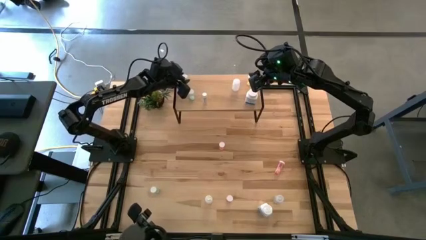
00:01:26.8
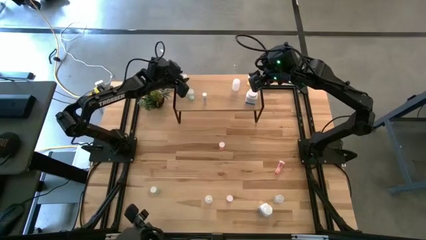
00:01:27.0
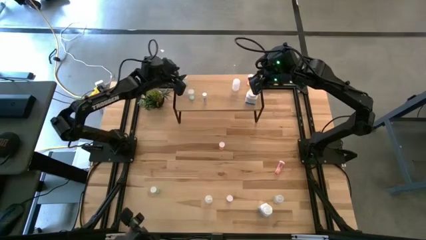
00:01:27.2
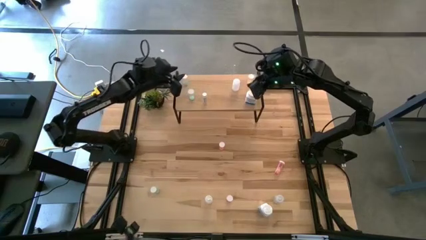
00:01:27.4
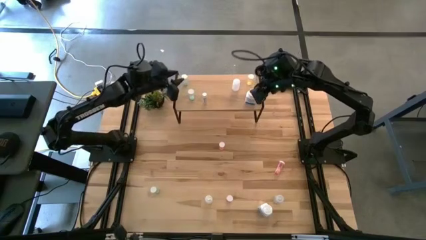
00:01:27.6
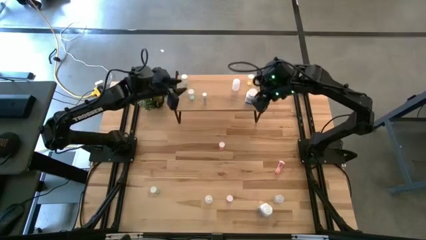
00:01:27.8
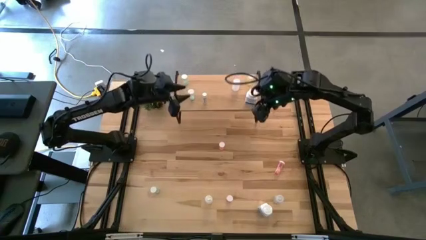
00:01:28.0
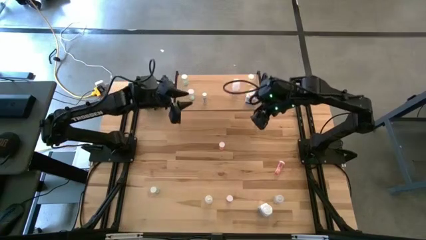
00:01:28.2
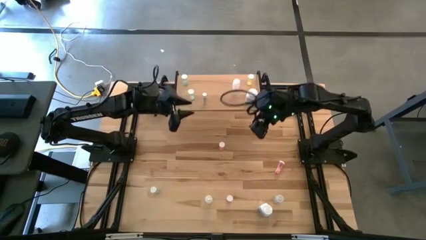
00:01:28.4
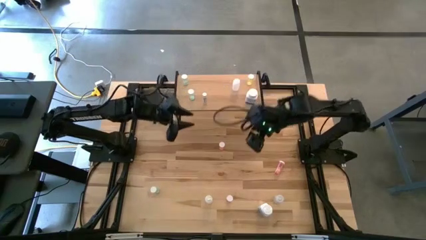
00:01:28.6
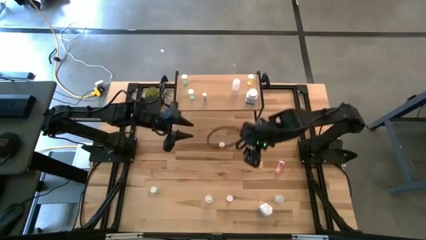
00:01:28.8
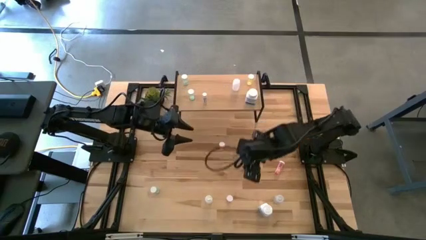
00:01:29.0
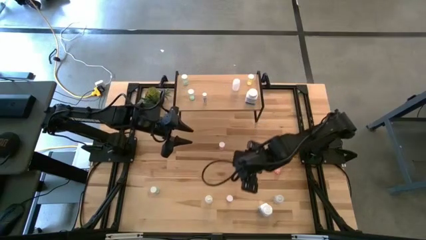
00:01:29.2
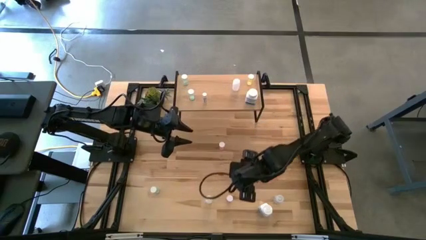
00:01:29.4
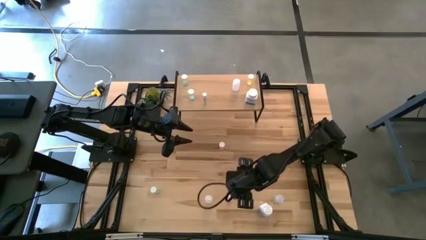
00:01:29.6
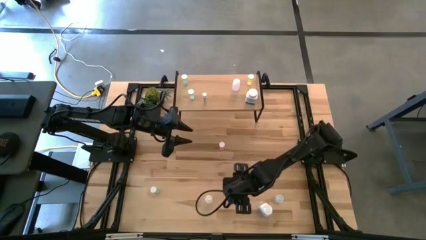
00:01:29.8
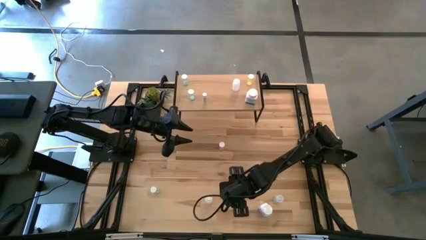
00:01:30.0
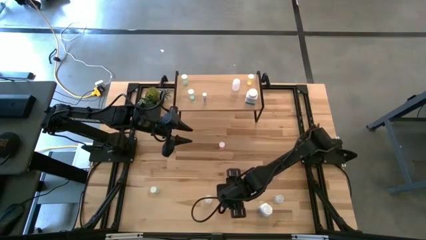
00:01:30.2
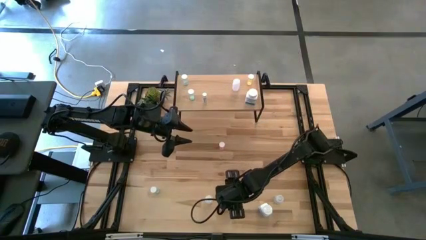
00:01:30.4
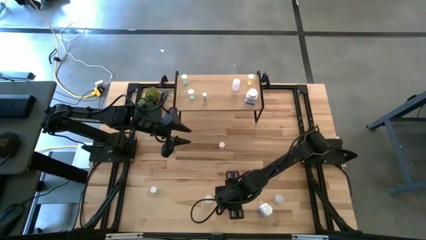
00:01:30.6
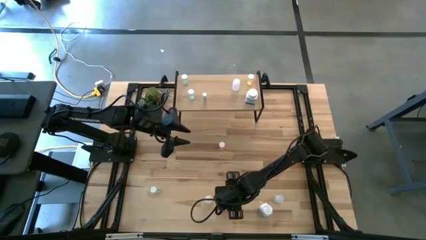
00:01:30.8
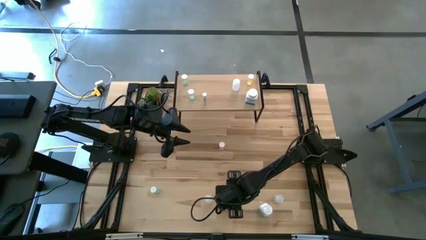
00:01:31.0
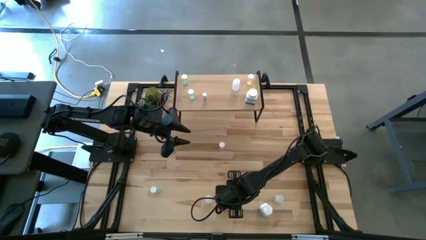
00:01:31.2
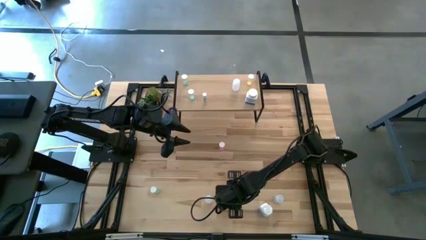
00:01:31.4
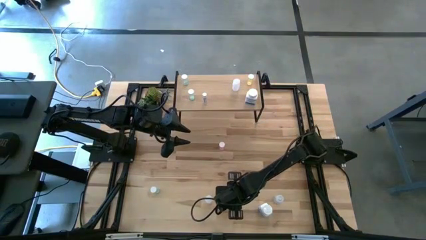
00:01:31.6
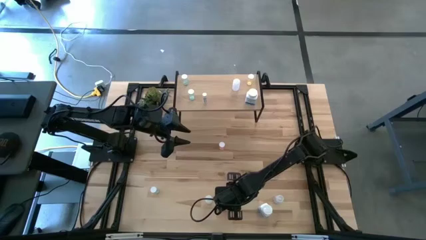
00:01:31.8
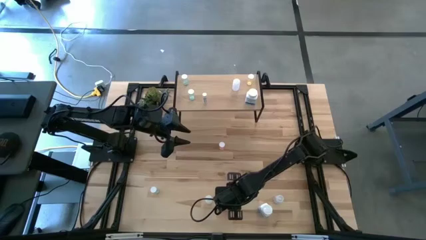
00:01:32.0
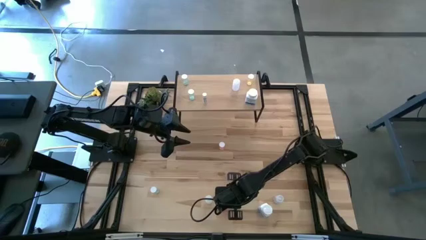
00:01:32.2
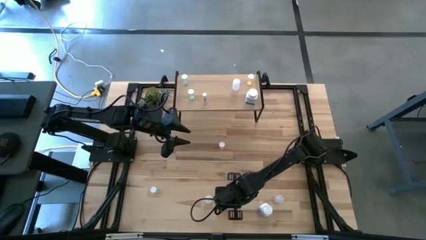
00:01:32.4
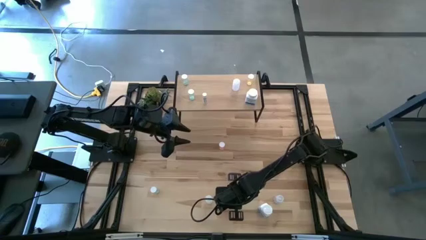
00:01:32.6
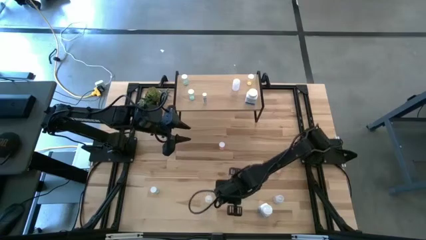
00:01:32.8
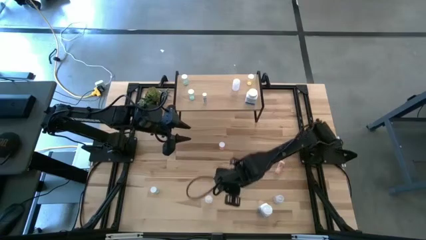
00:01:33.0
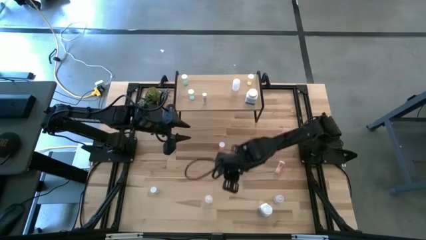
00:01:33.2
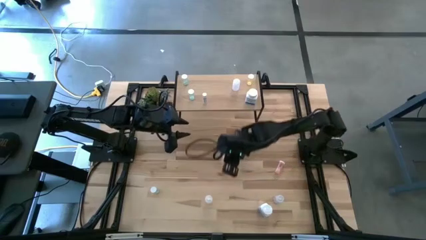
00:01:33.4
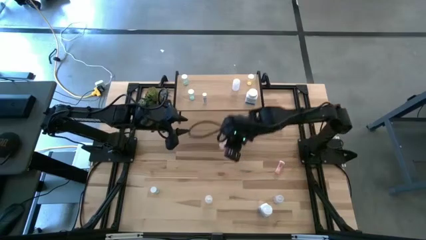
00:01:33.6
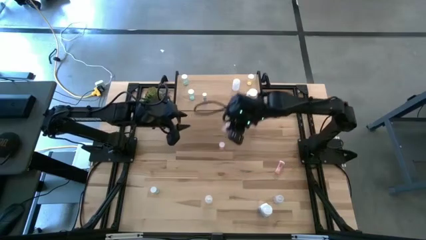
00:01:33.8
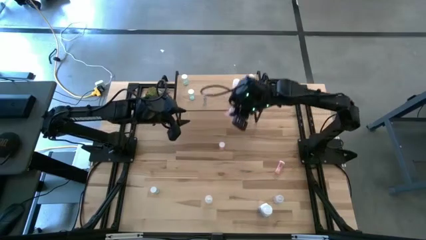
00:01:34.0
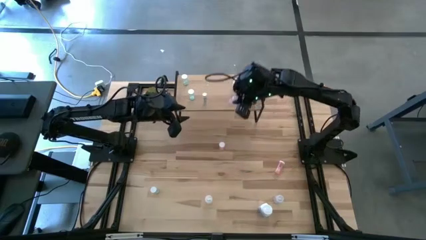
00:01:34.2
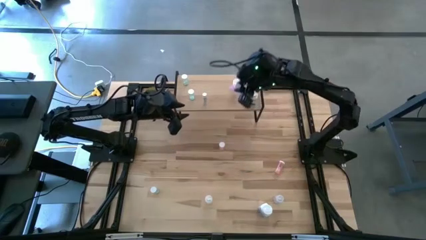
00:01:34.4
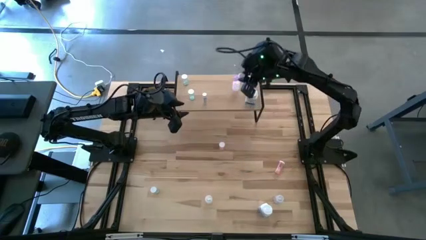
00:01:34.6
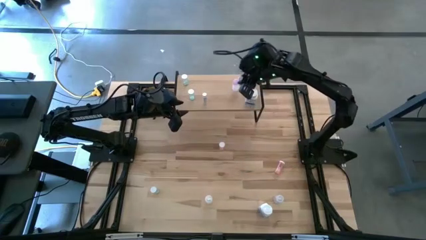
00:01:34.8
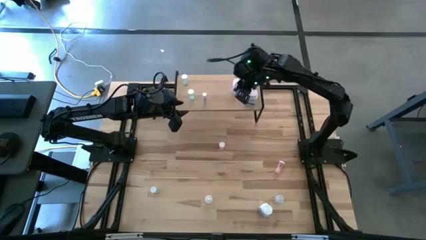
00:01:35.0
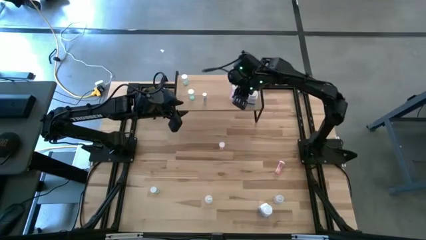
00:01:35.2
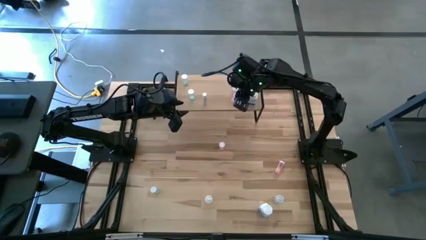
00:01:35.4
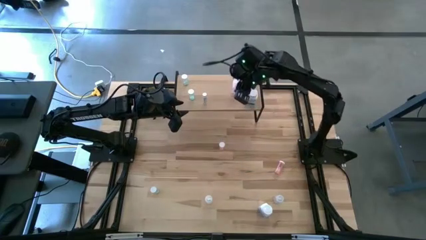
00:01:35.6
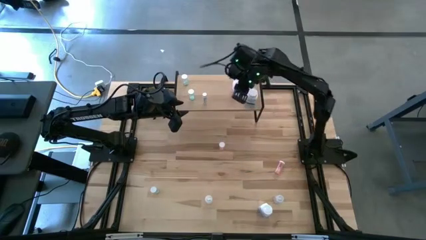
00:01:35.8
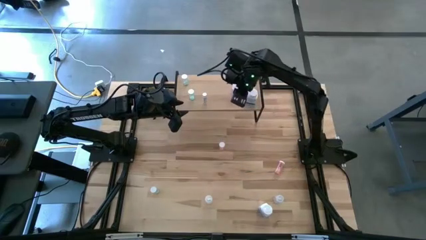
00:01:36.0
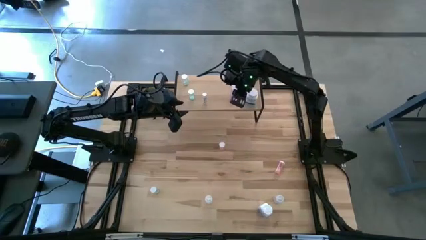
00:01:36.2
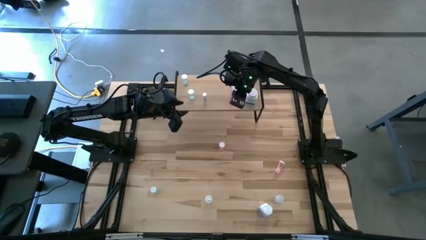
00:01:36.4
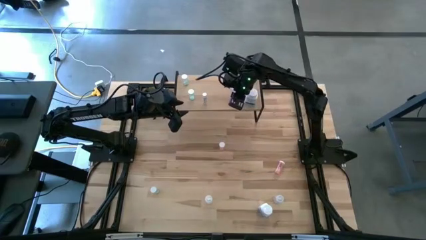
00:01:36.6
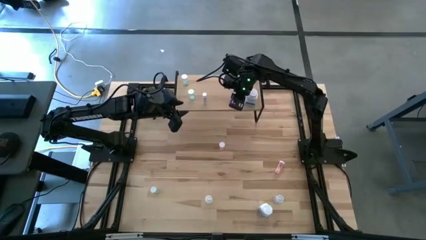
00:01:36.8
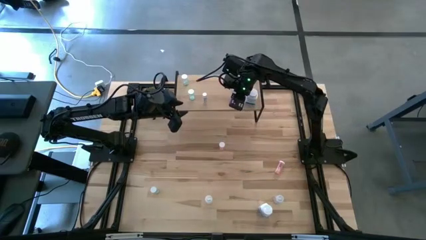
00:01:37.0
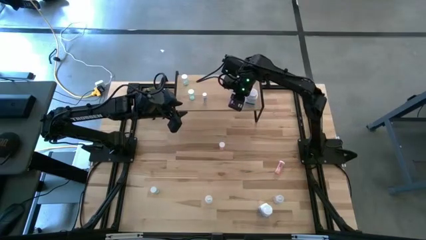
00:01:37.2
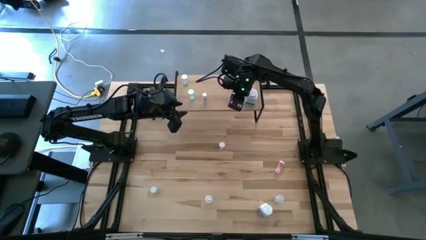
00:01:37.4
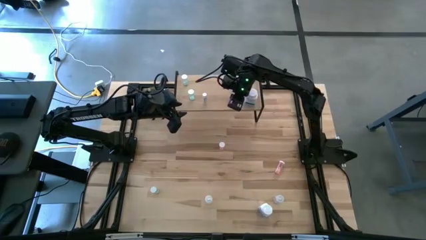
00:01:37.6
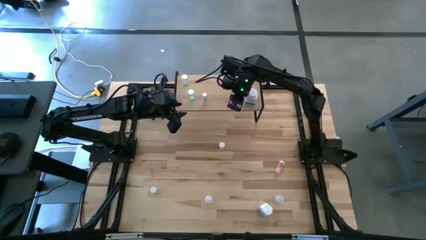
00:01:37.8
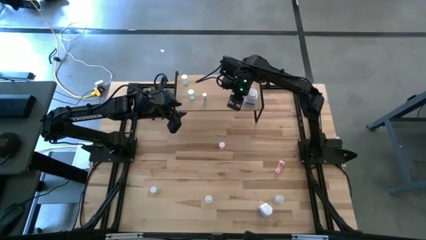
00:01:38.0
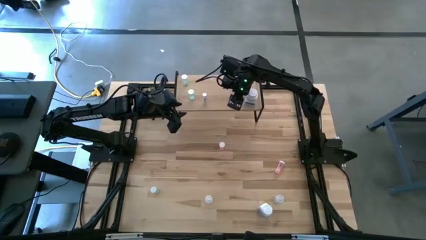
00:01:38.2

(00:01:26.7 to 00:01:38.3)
Task: Pick and place medicine bottles onto shelf by color
Put the pink pill bottle on the shelf

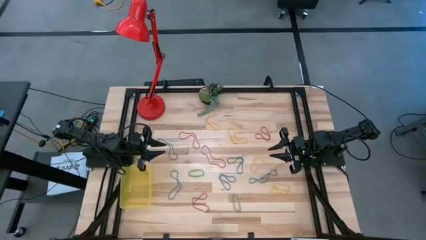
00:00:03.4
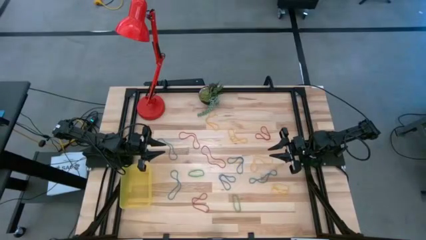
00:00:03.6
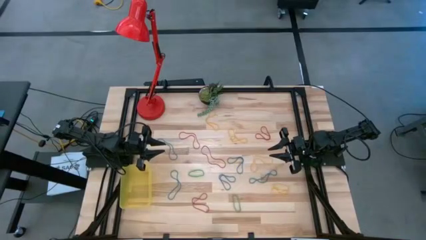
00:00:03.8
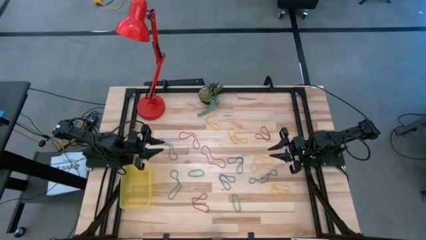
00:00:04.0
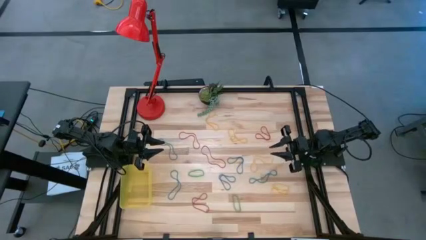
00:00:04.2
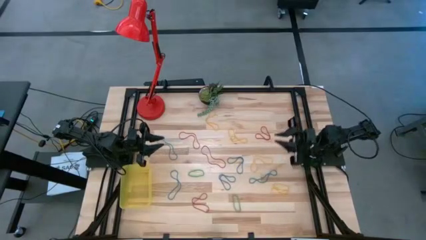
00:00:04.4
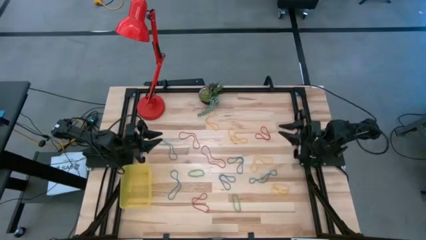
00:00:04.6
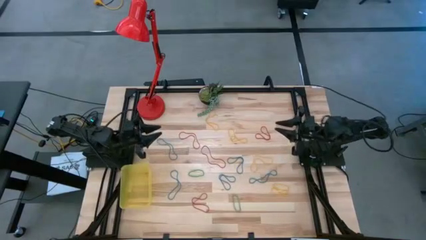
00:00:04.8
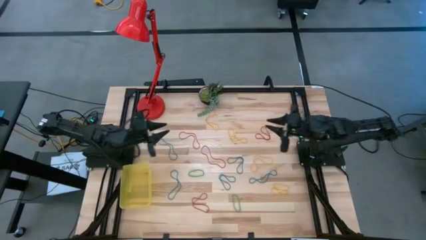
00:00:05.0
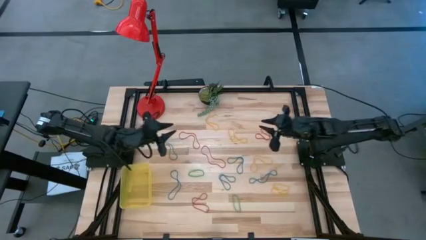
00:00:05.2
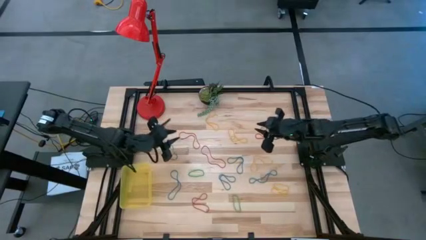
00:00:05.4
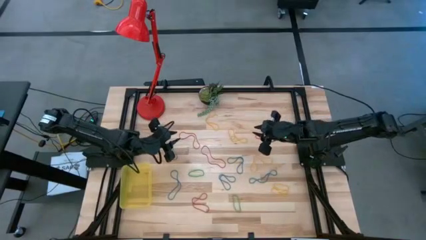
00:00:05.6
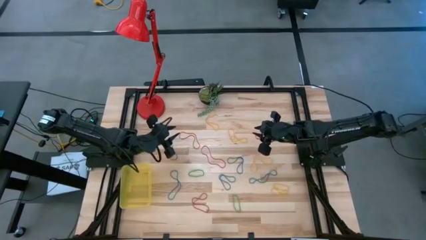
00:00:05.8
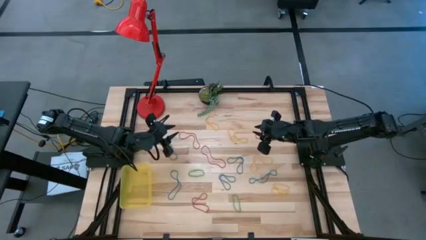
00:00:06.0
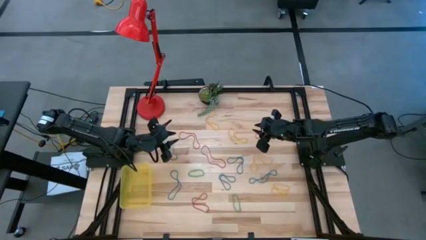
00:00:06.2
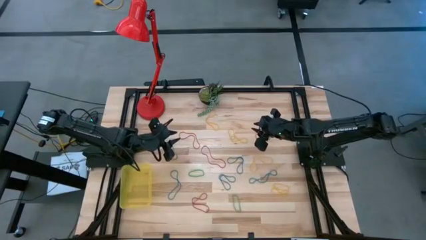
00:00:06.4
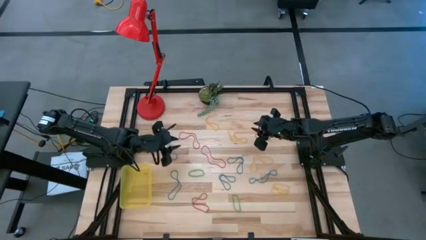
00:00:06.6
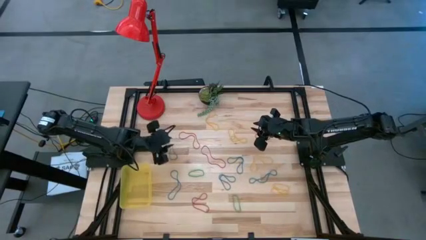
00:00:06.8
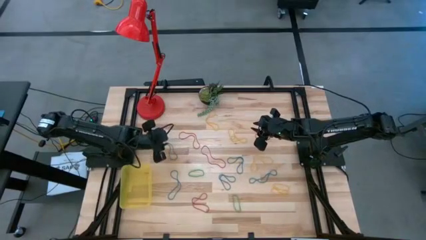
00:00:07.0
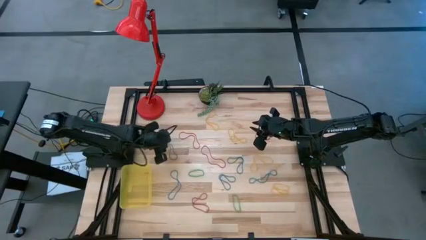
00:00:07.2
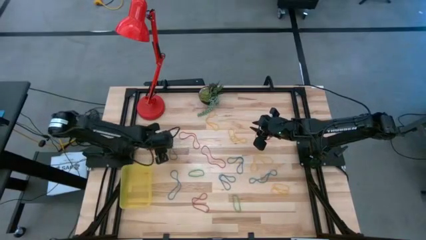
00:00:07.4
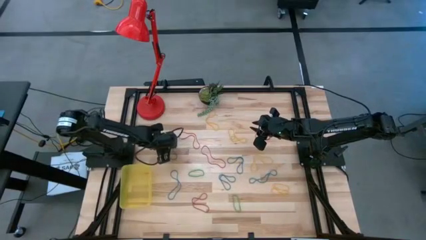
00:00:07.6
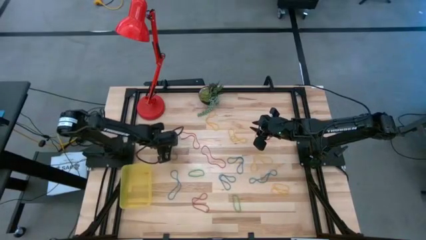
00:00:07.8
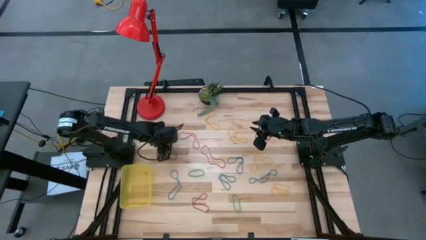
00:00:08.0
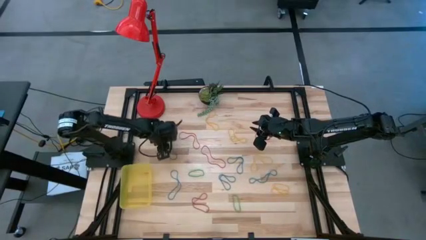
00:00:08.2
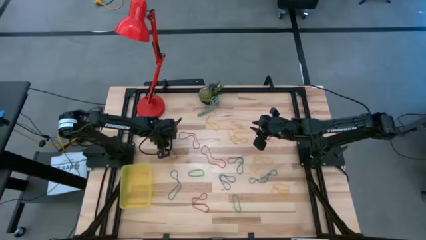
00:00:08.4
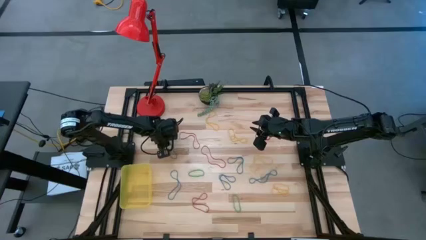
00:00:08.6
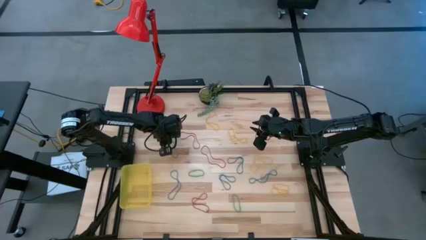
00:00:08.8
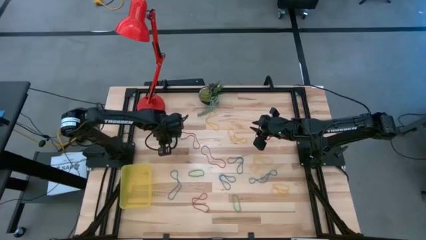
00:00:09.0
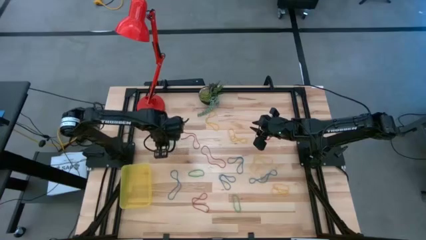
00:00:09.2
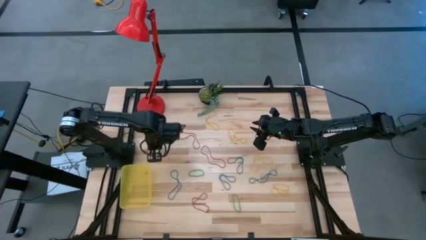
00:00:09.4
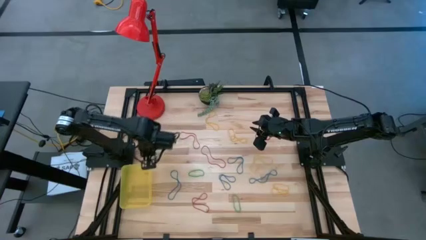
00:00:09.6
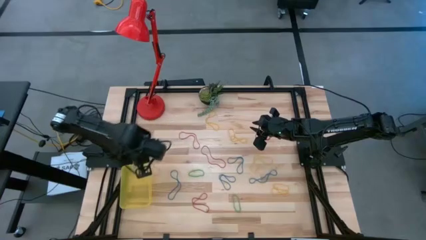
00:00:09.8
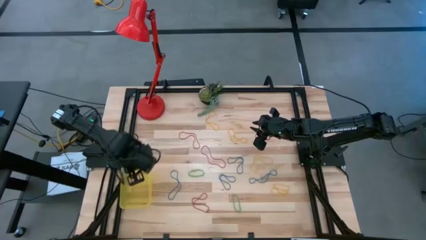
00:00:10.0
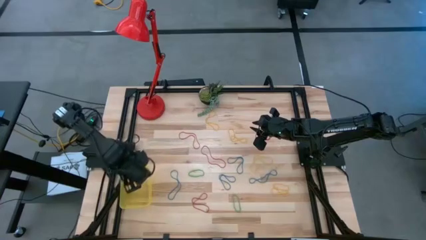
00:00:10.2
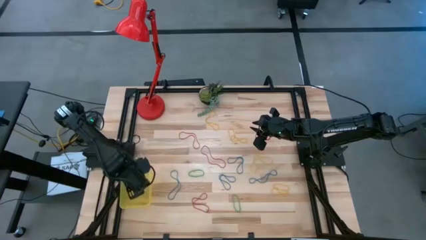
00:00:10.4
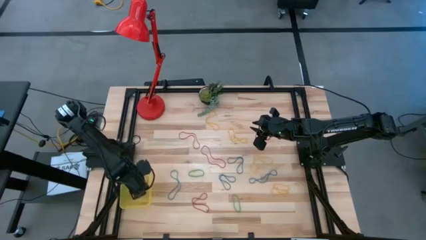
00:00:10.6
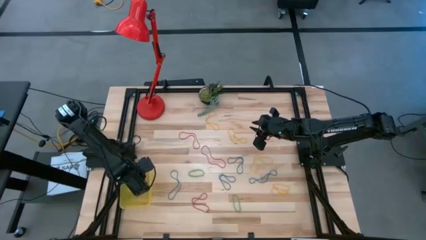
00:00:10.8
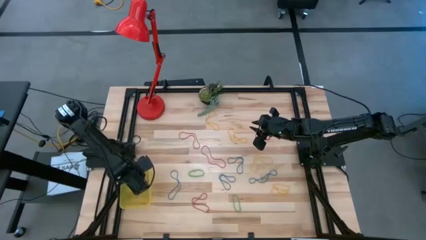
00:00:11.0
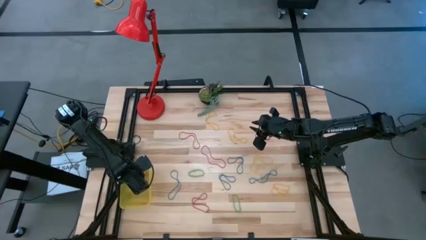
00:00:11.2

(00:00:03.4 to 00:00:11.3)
Task: Pick and place items into bin
Put the blue rubber band into the yellow bin
